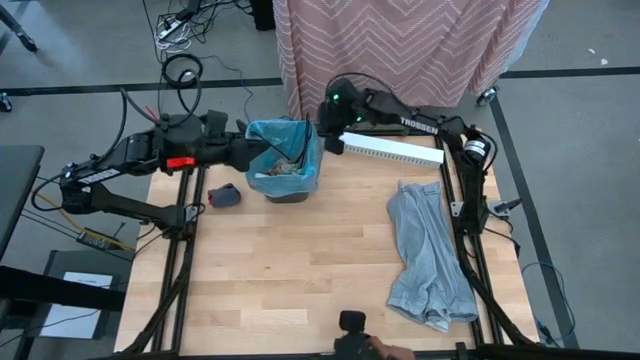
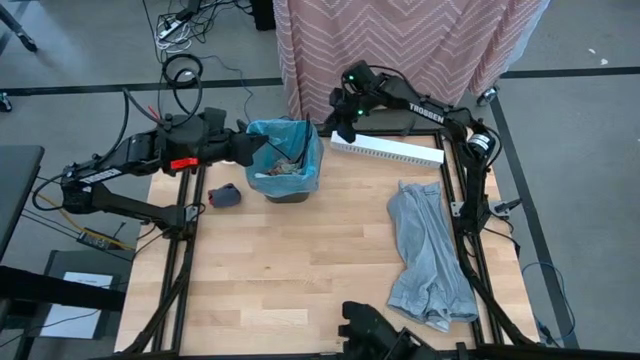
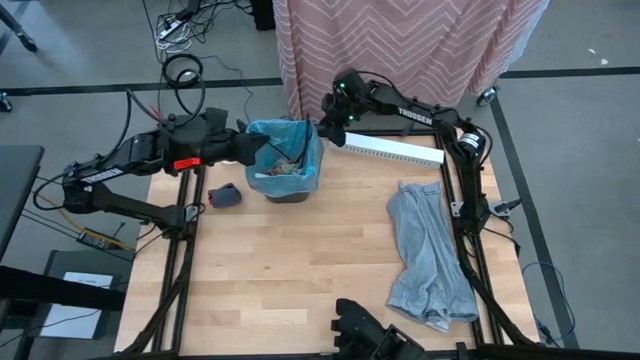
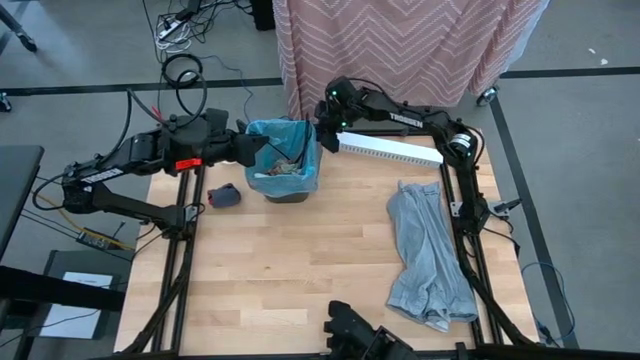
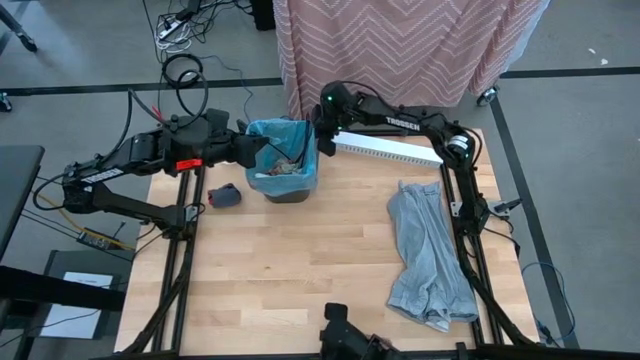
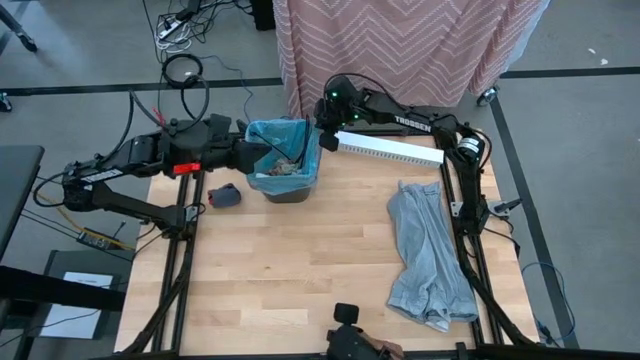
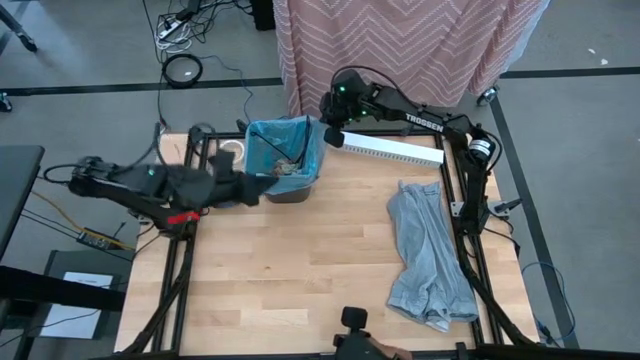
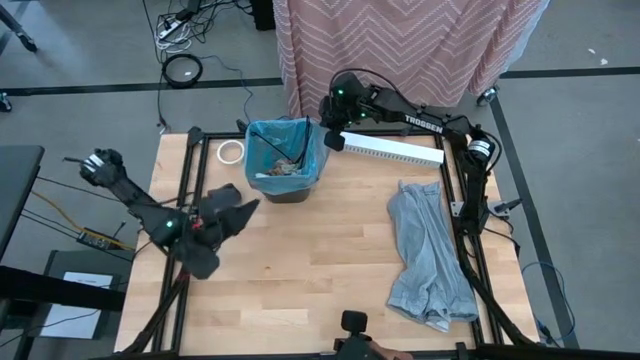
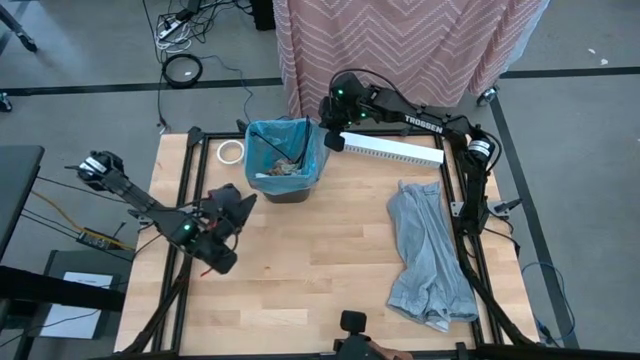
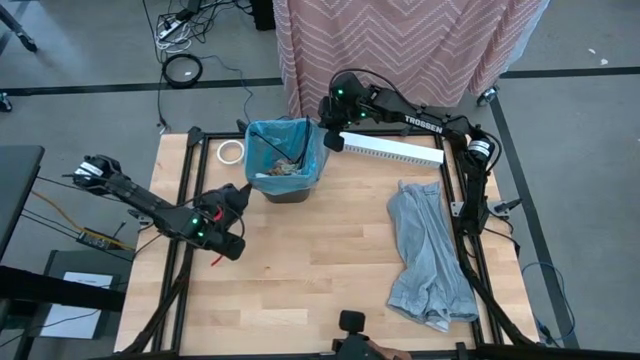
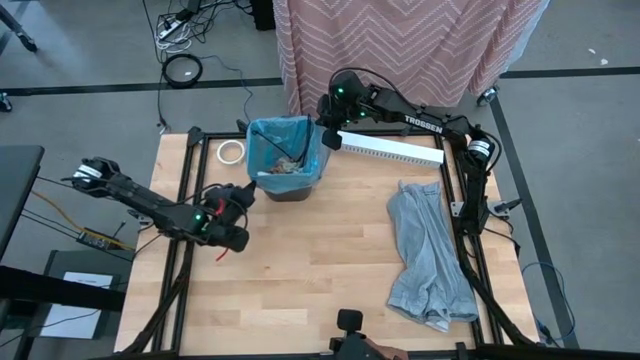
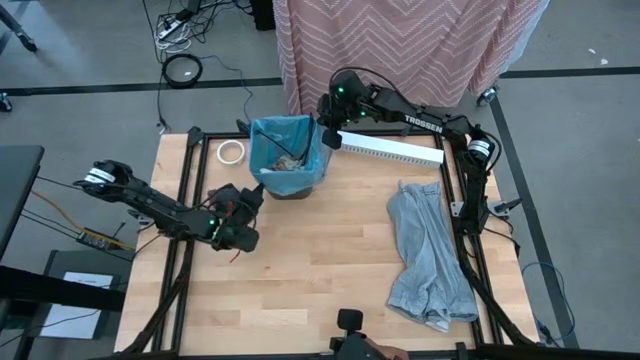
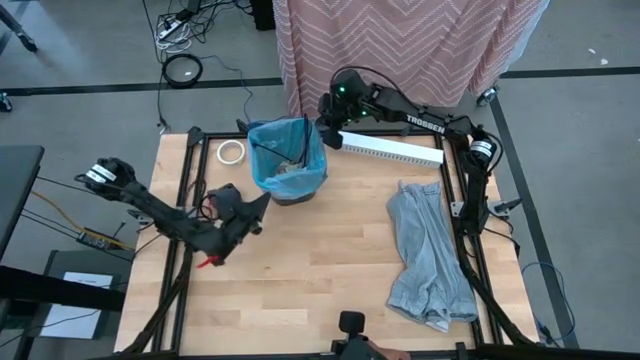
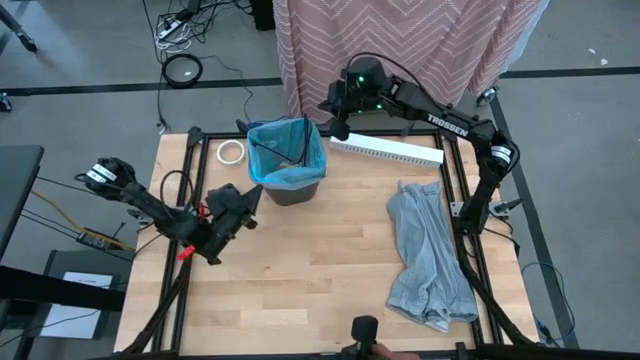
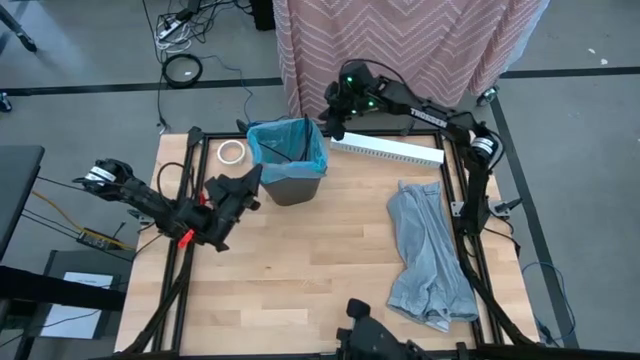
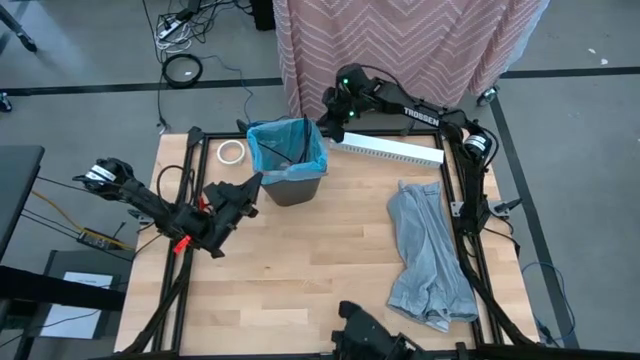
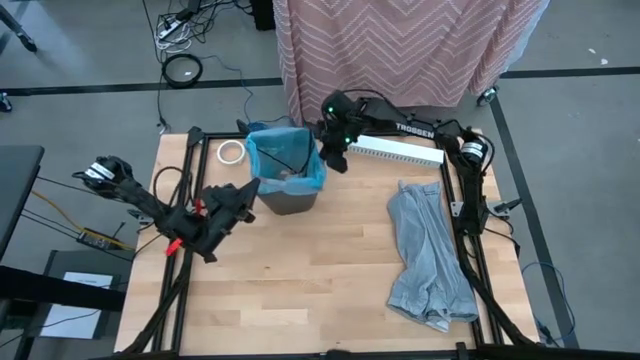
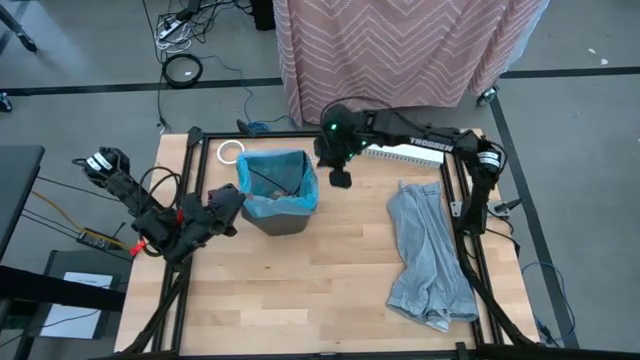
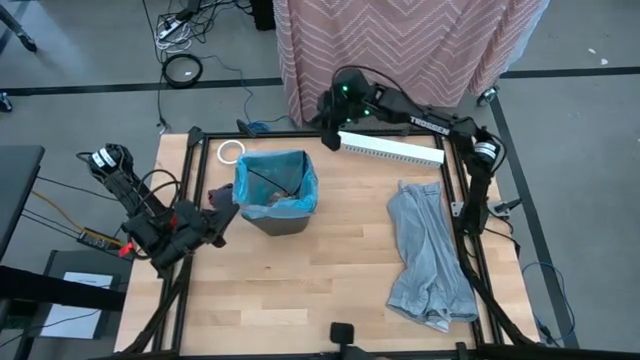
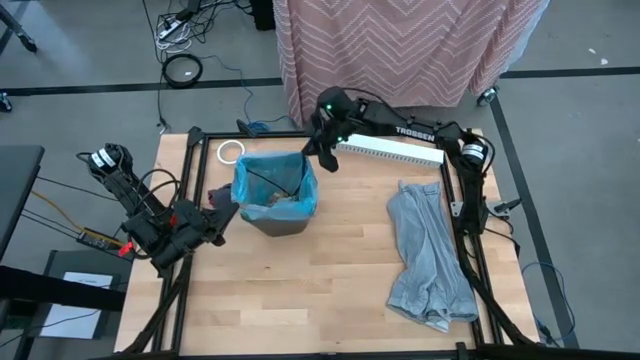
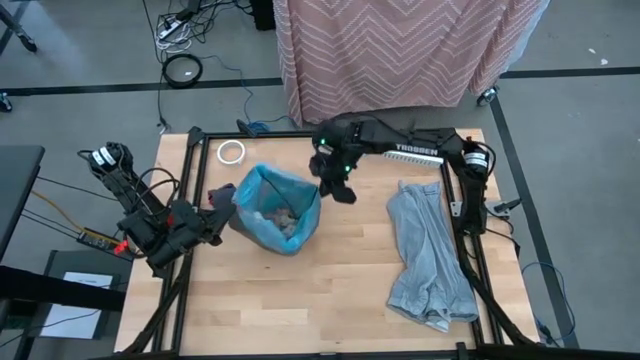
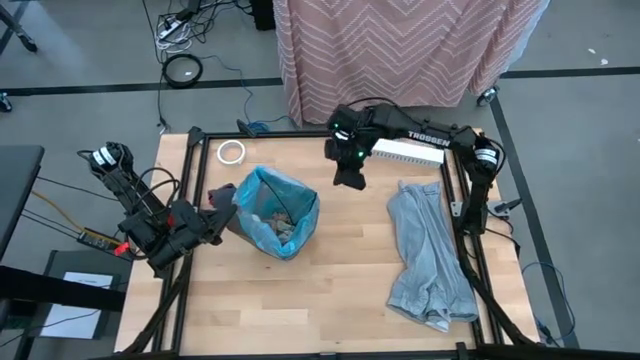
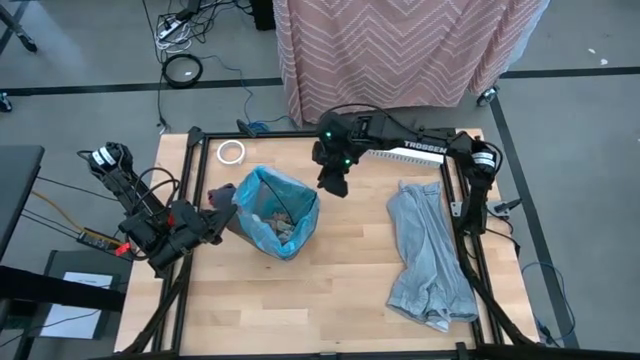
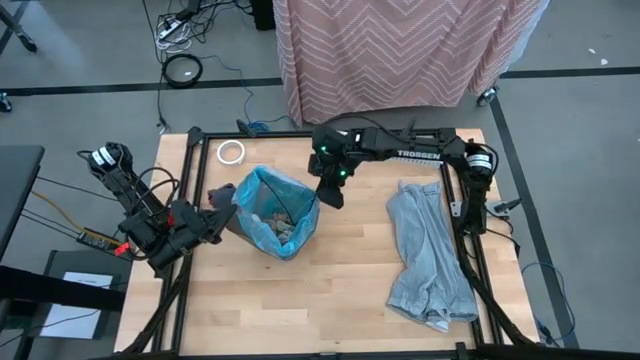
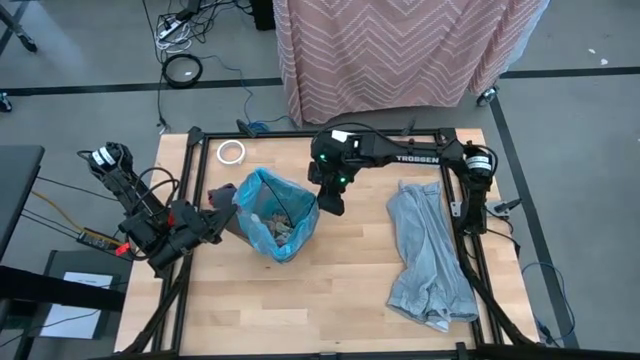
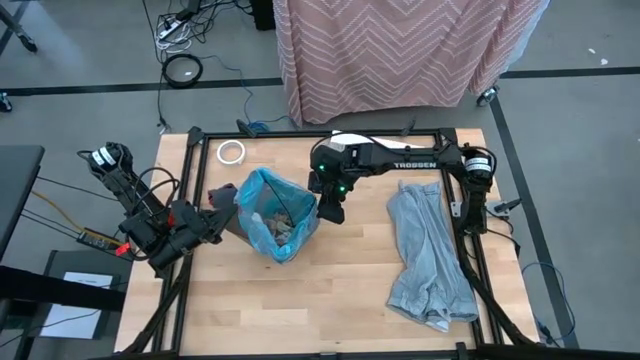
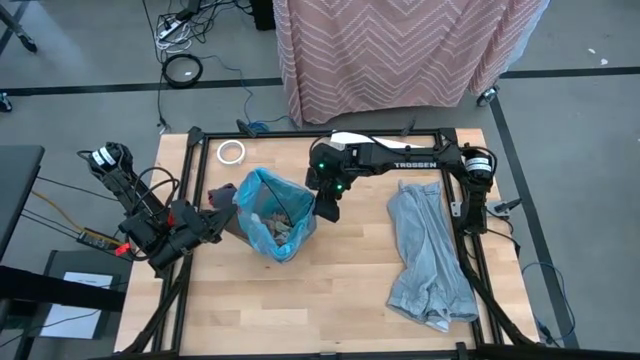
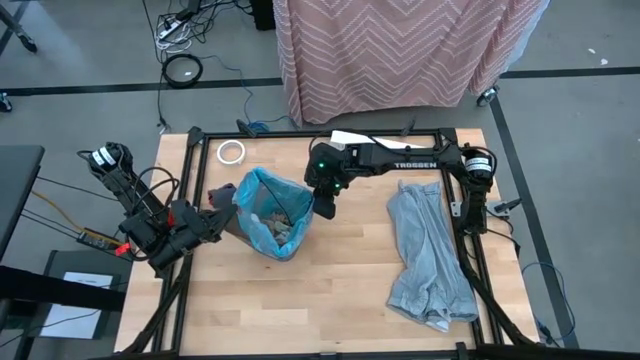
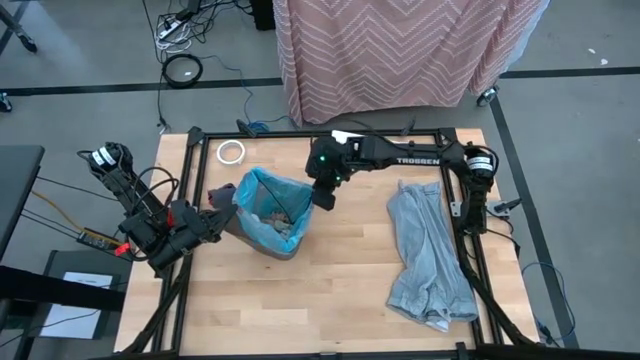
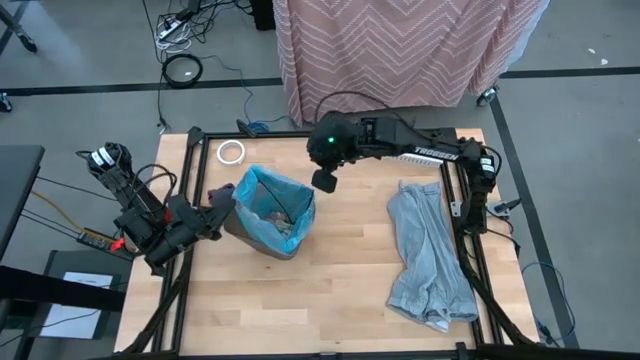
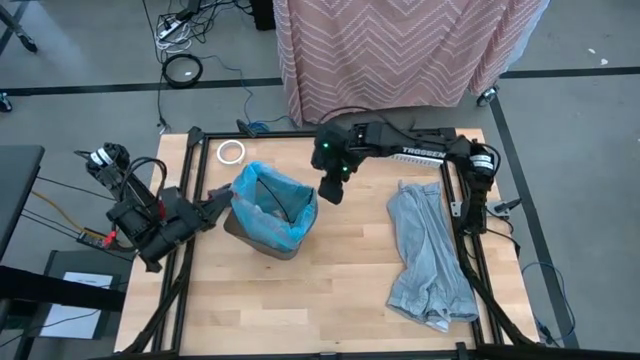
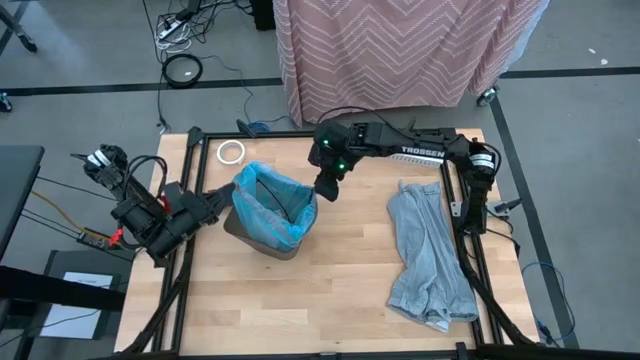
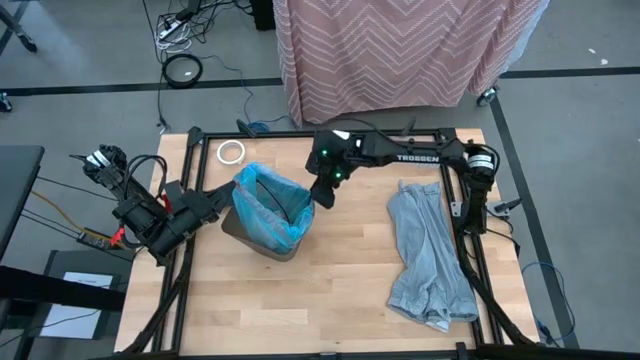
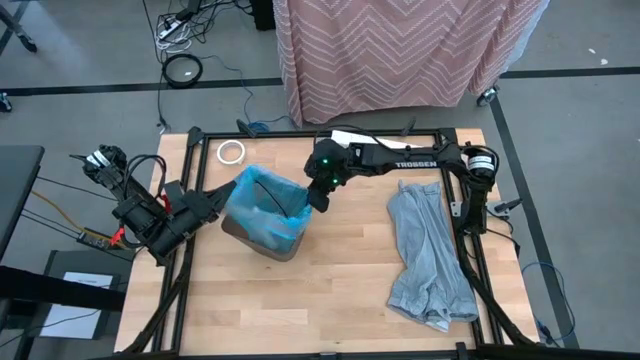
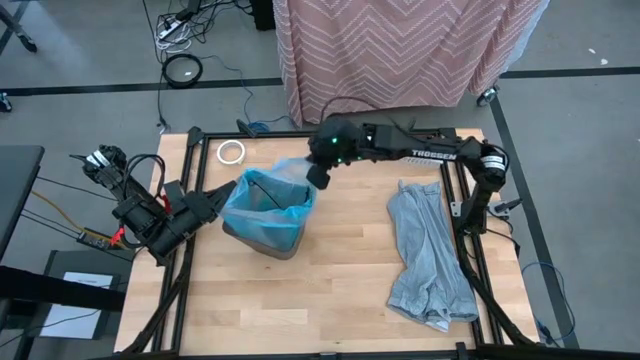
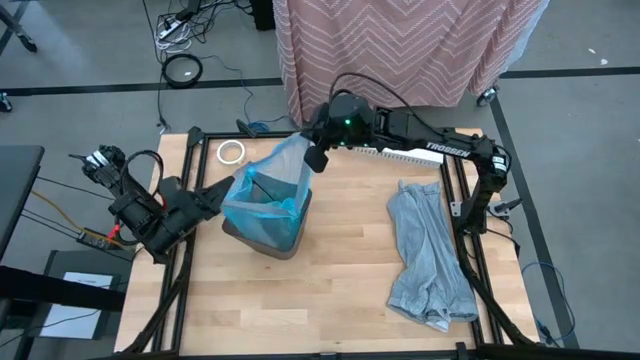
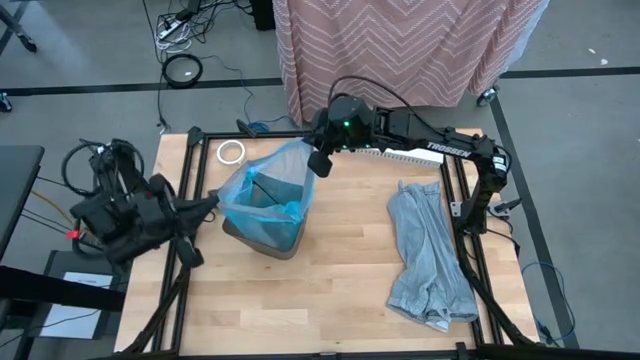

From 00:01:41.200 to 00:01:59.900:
Task: place trash/remove bag and relplace
Remove the blue trash bag from the black trash bin

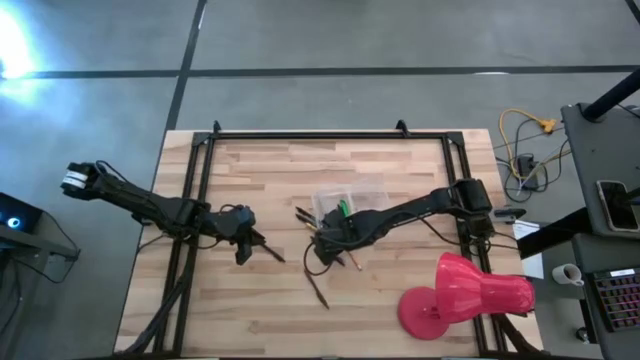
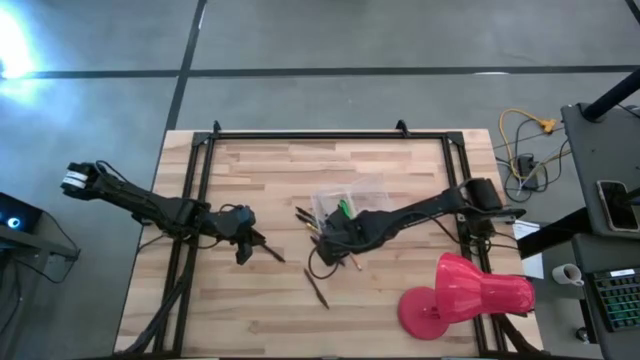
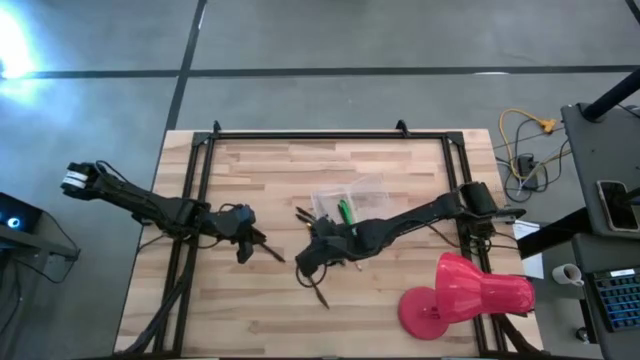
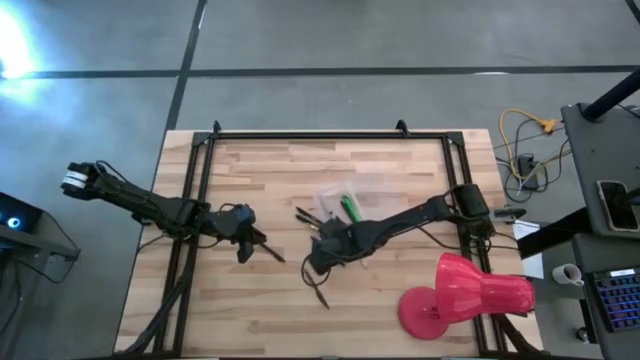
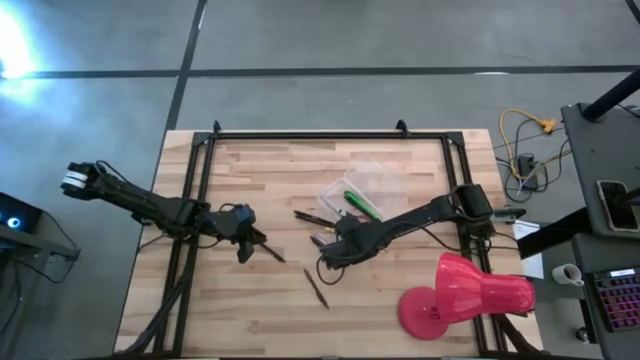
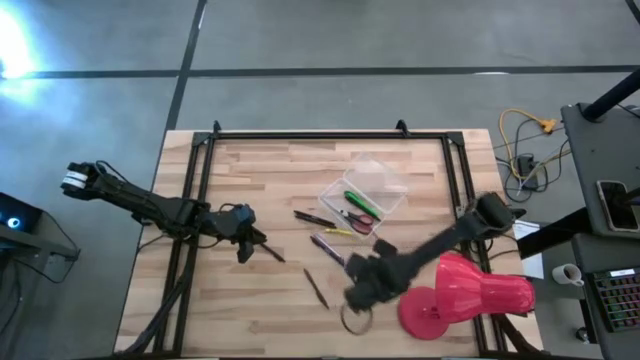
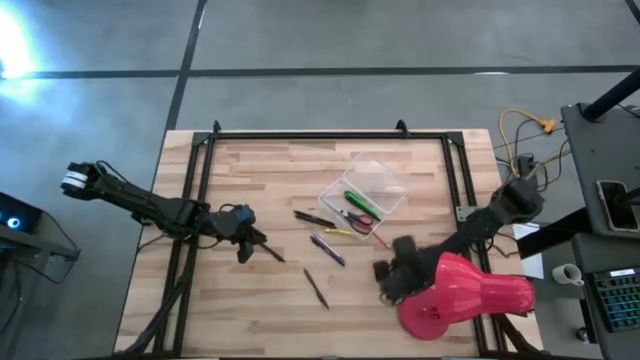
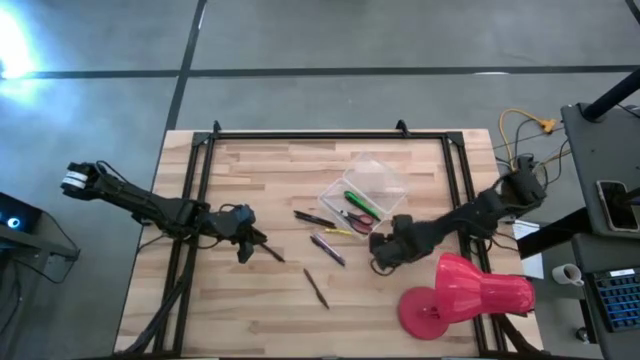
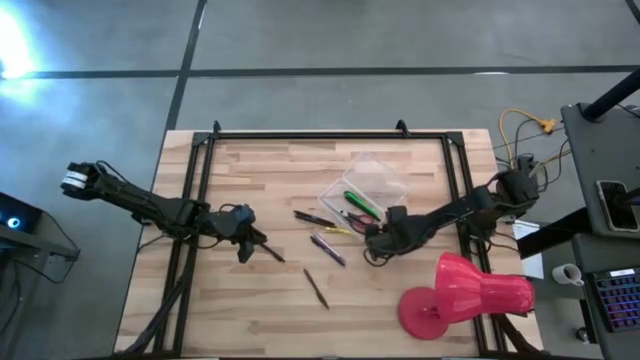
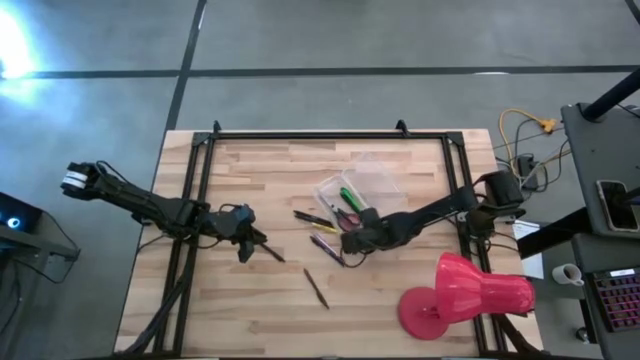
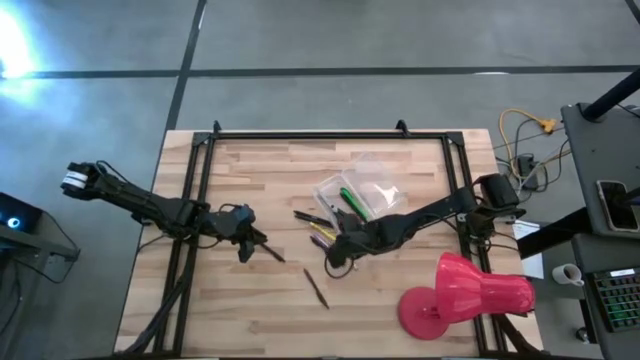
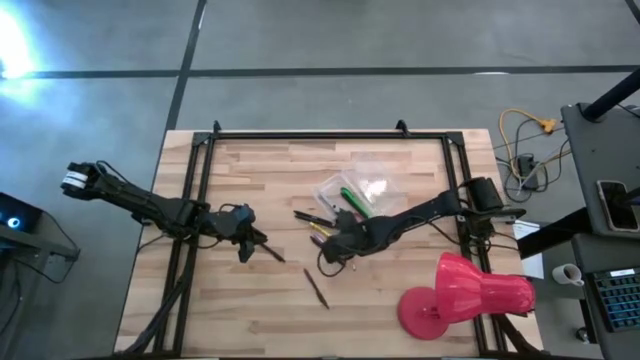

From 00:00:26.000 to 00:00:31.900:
Task: Pick & place school supplies into a supply box
Adjust the transparent supply box
